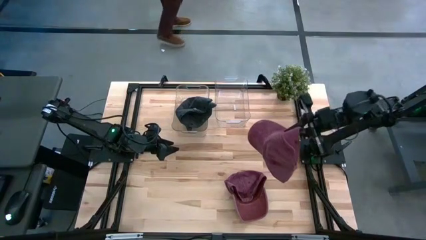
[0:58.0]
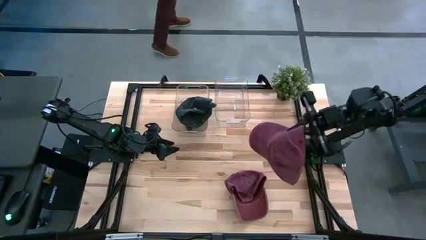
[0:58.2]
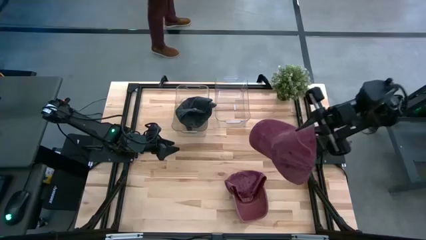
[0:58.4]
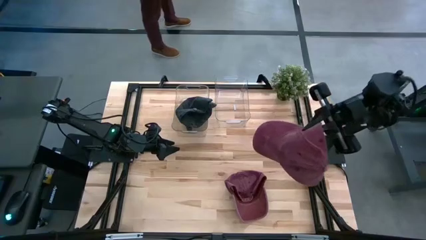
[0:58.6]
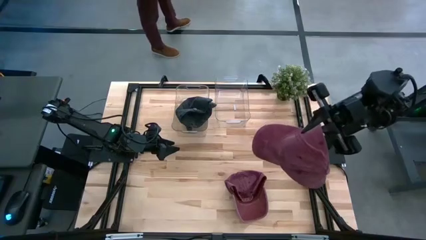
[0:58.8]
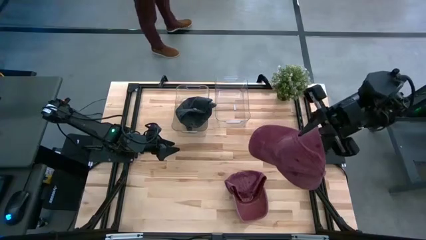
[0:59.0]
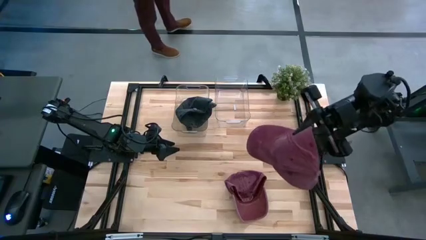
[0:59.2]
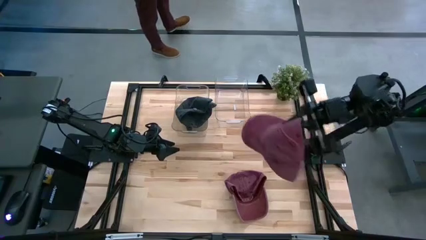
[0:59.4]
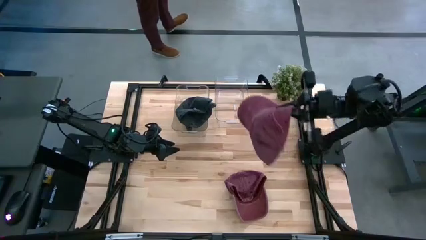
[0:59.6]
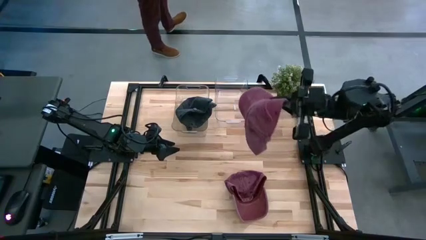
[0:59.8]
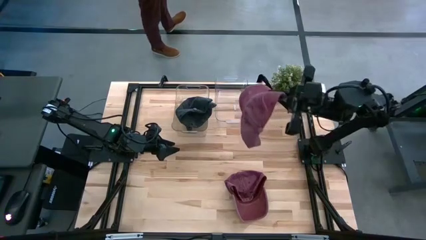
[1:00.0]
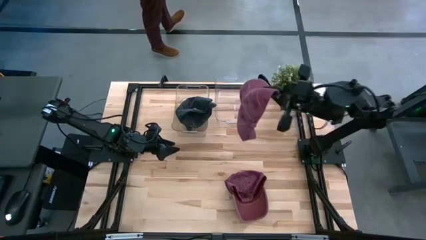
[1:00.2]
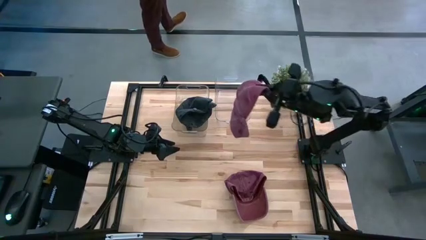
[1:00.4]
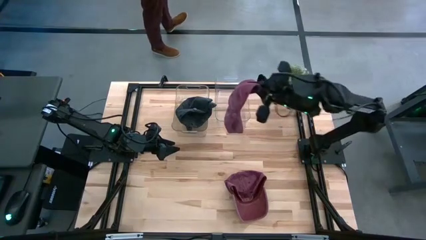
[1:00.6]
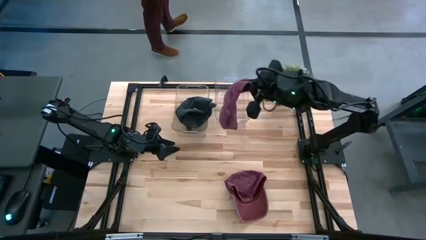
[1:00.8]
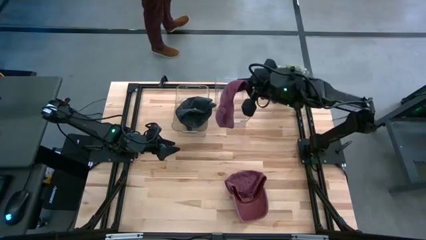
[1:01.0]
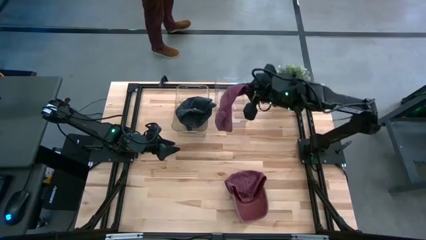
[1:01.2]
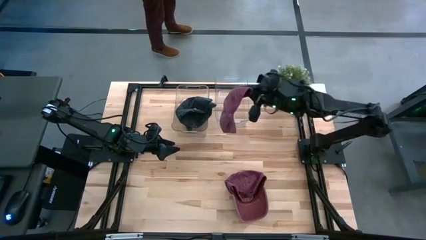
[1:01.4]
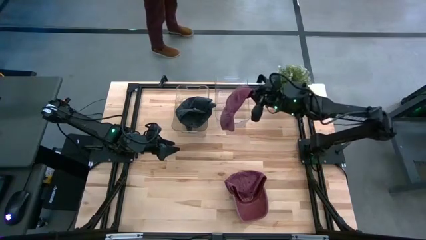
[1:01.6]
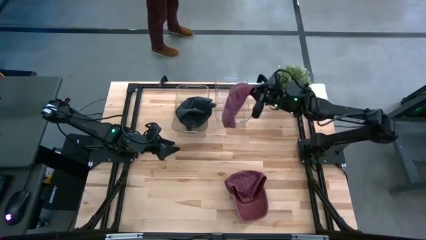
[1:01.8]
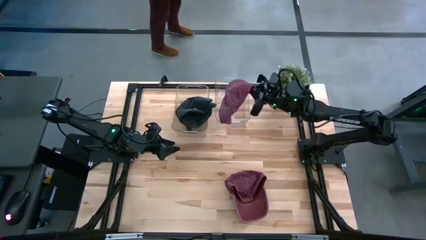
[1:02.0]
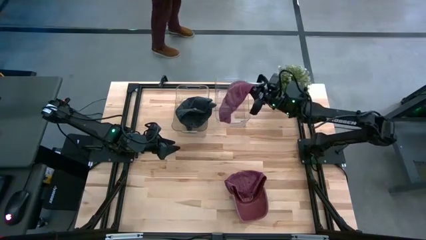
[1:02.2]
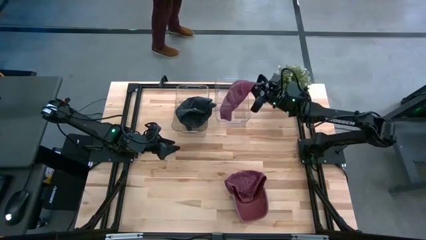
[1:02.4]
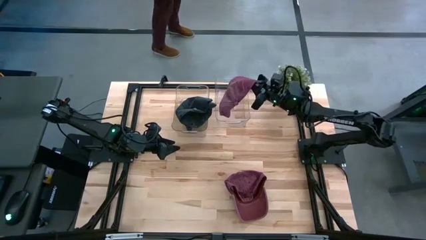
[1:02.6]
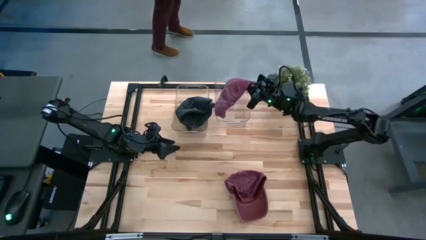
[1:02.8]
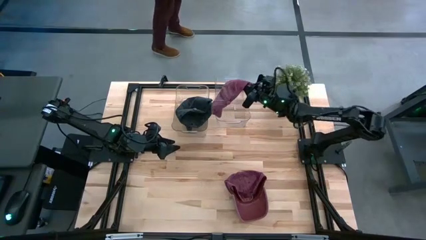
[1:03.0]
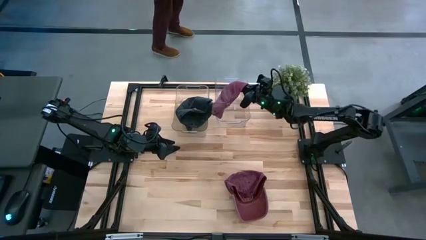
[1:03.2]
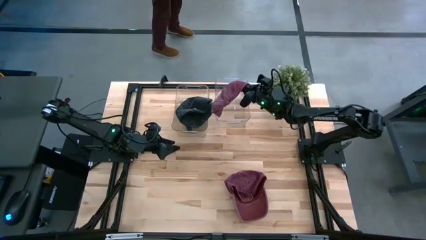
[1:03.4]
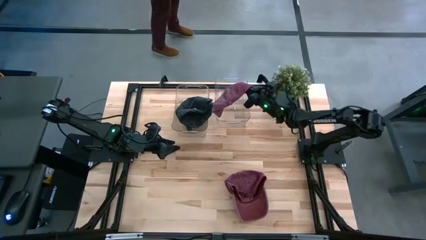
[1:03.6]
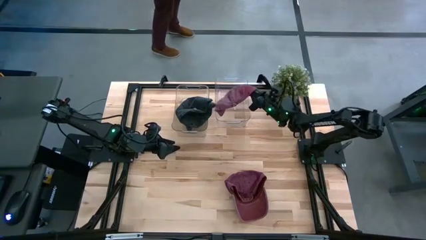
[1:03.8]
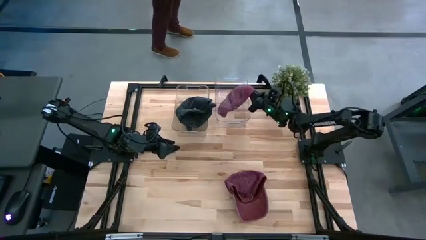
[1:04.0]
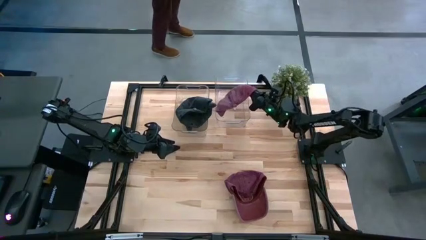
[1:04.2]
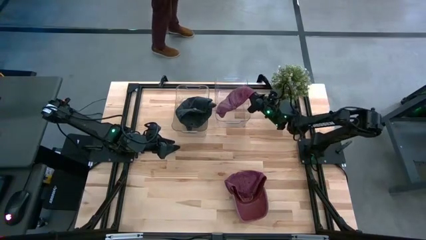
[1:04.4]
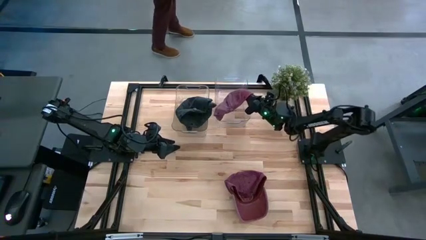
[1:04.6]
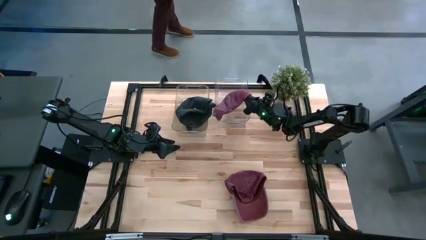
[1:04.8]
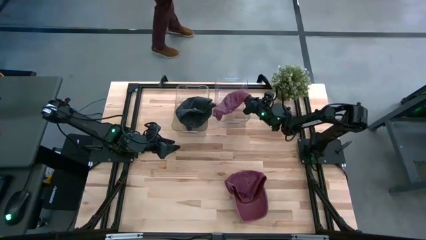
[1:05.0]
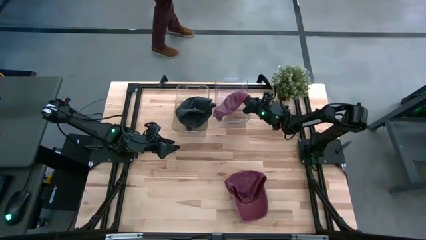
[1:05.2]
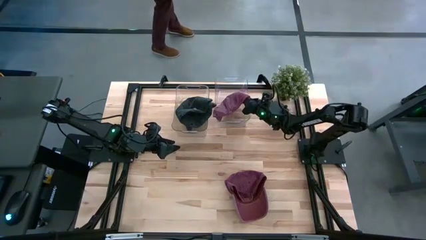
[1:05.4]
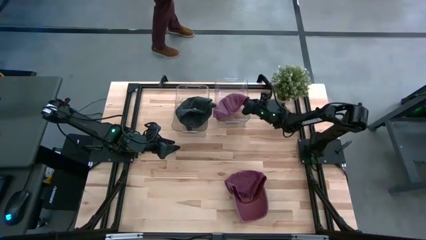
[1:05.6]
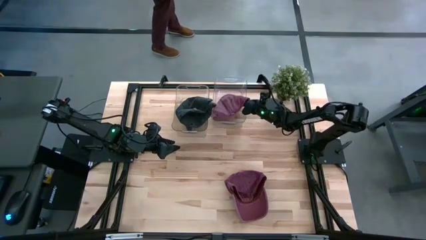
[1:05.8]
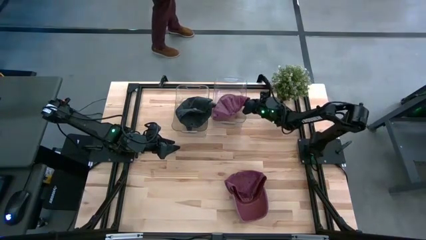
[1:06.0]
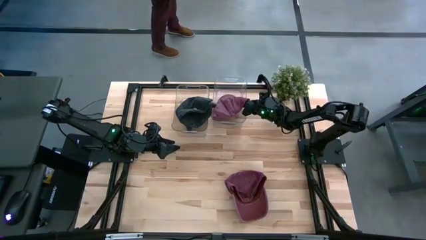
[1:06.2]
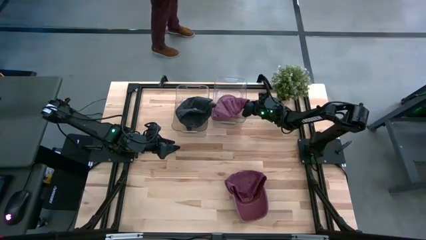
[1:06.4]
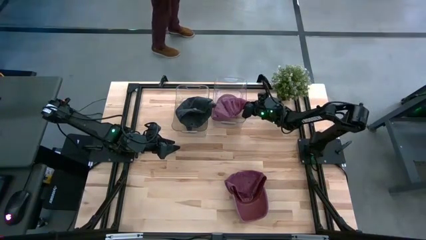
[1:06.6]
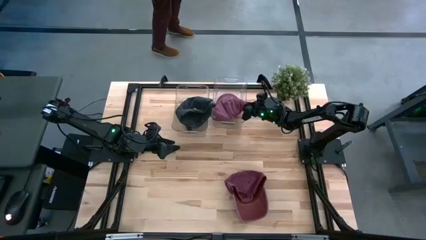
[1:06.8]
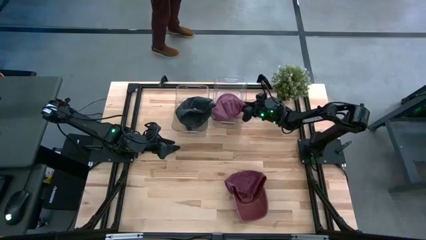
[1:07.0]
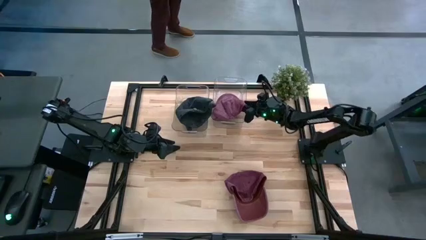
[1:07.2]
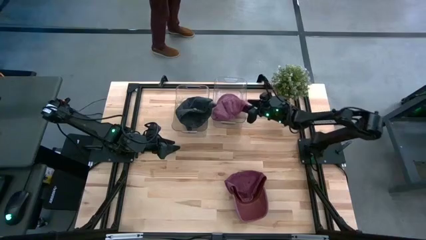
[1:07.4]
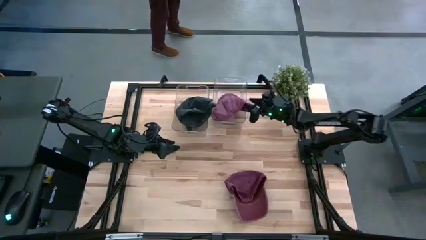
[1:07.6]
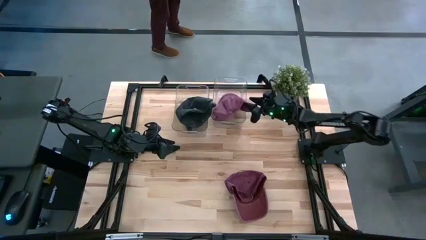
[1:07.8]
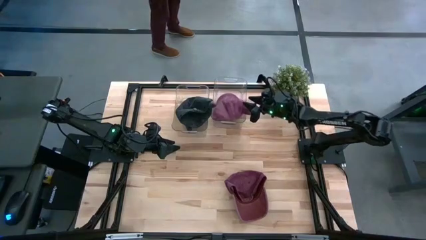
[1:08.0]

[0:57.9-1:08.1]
Task: Pick & Place hat
Put the right red cap into the right transparent bin

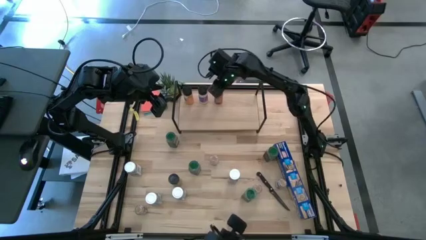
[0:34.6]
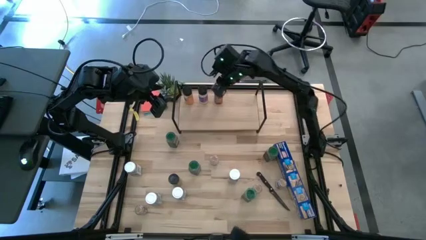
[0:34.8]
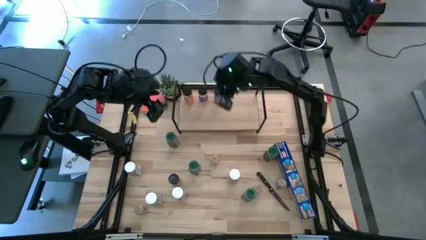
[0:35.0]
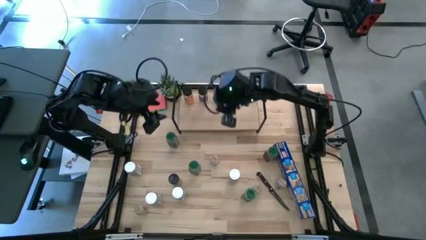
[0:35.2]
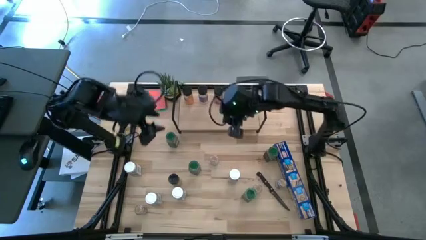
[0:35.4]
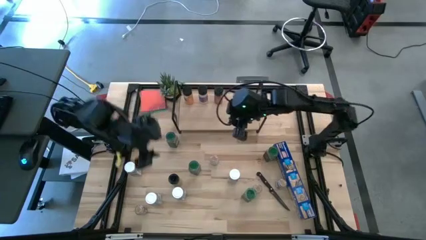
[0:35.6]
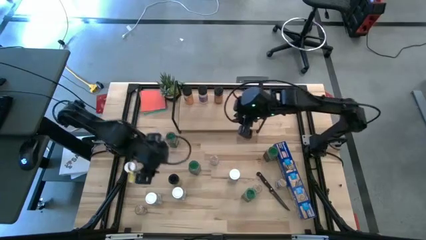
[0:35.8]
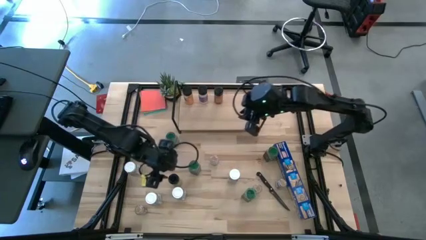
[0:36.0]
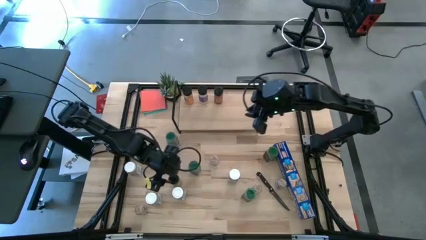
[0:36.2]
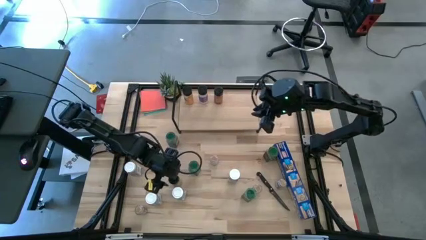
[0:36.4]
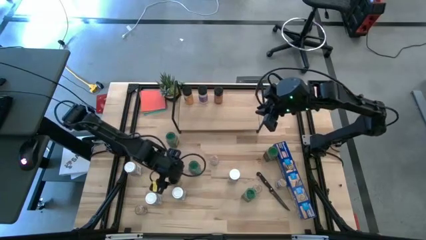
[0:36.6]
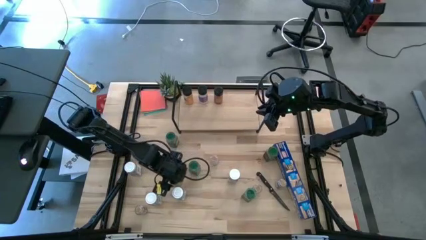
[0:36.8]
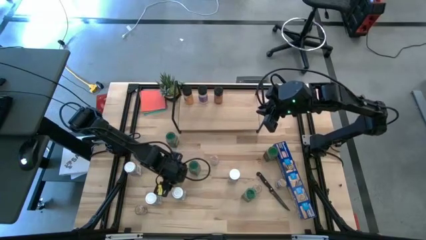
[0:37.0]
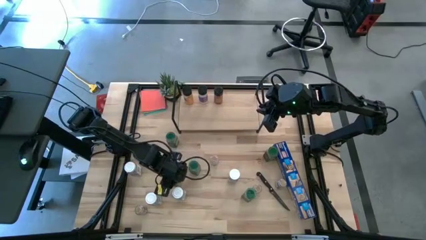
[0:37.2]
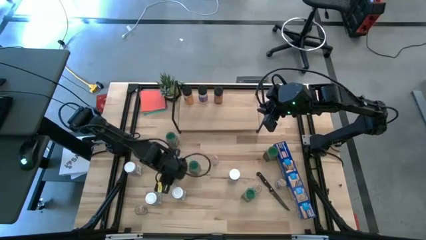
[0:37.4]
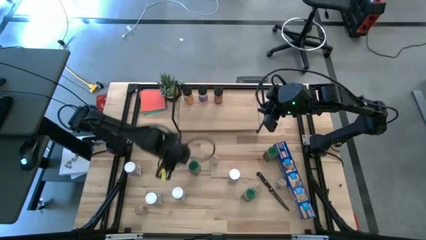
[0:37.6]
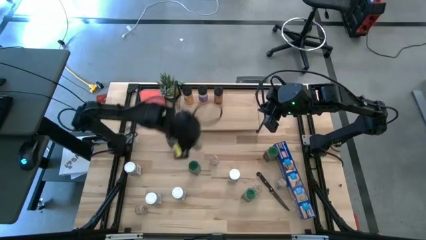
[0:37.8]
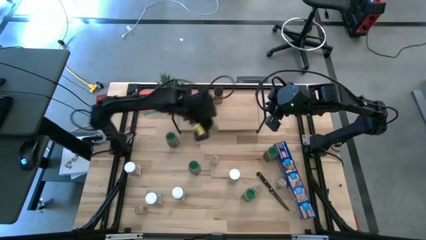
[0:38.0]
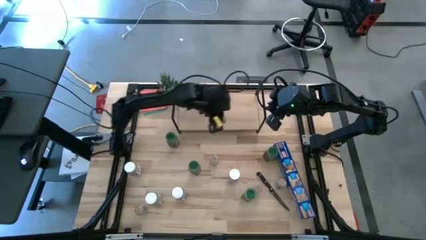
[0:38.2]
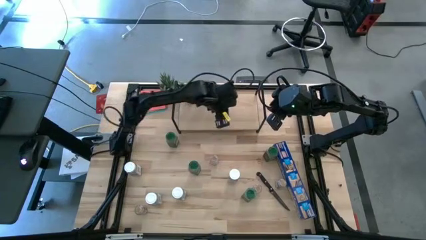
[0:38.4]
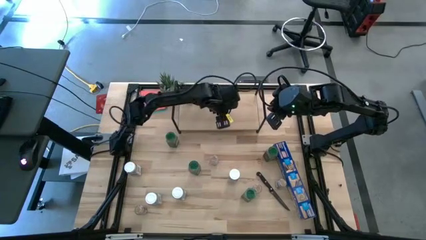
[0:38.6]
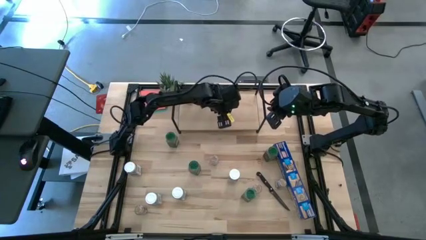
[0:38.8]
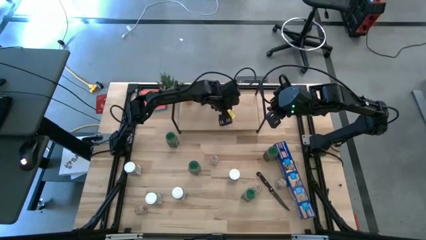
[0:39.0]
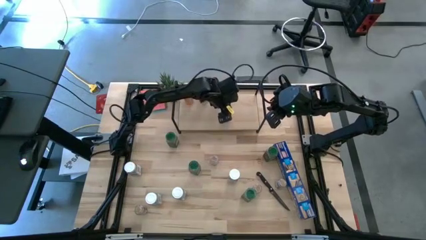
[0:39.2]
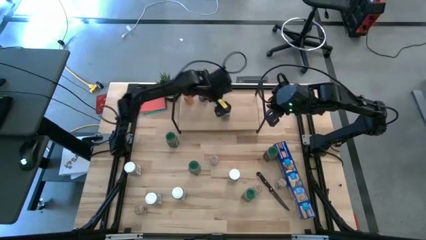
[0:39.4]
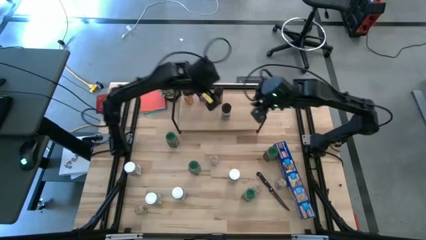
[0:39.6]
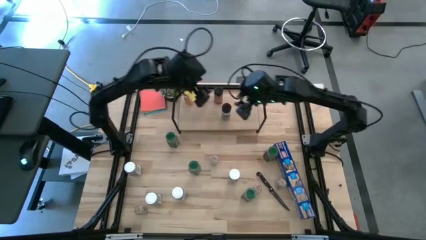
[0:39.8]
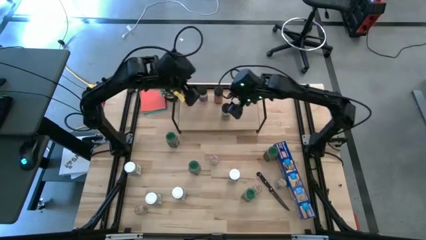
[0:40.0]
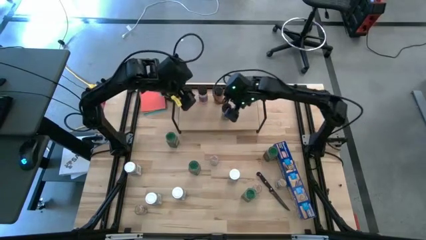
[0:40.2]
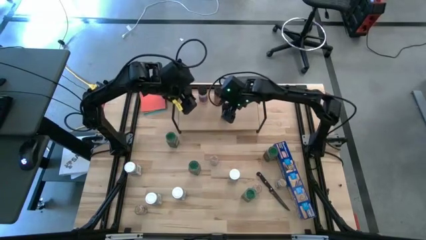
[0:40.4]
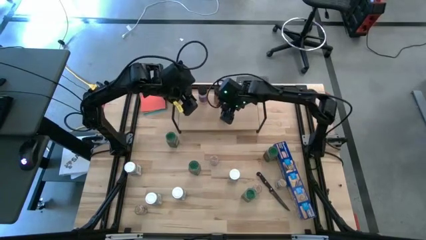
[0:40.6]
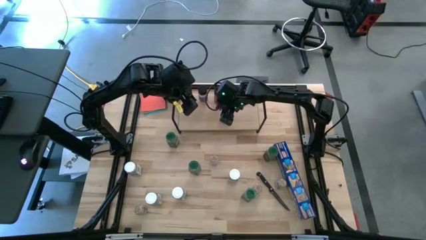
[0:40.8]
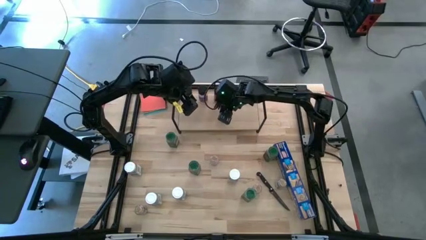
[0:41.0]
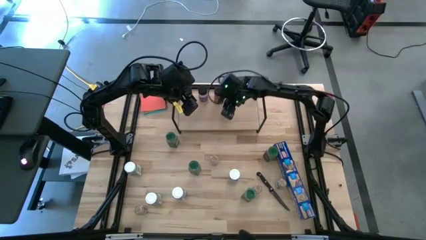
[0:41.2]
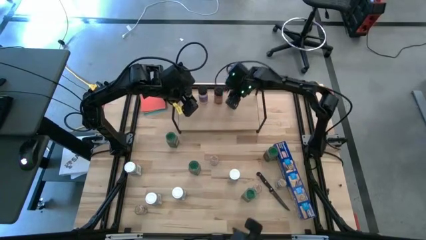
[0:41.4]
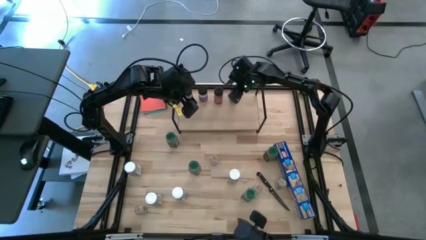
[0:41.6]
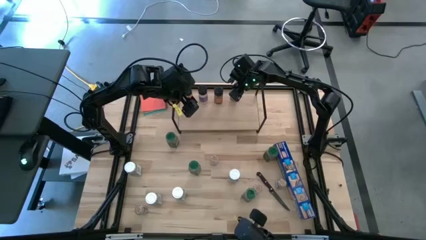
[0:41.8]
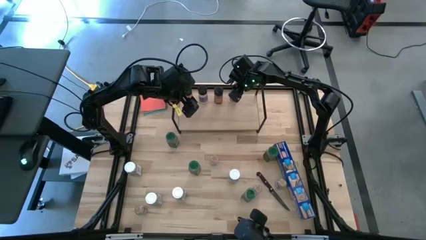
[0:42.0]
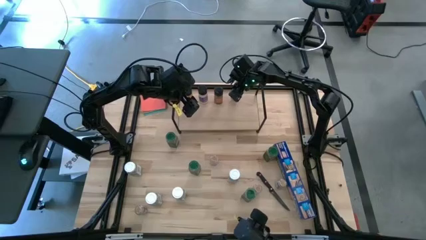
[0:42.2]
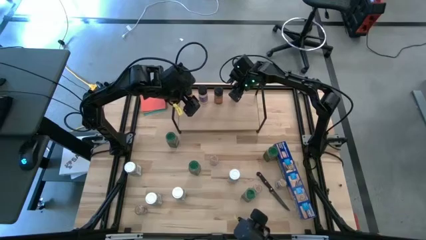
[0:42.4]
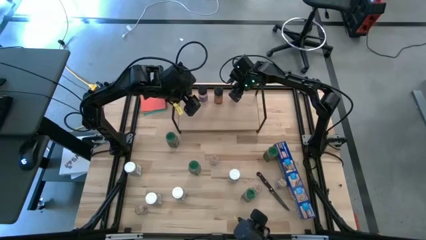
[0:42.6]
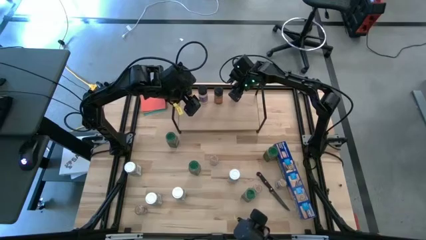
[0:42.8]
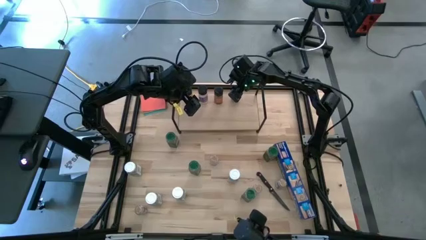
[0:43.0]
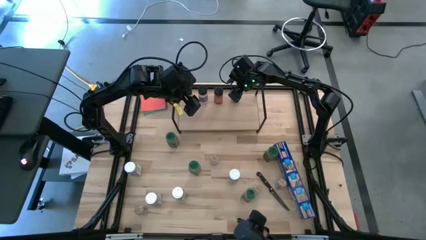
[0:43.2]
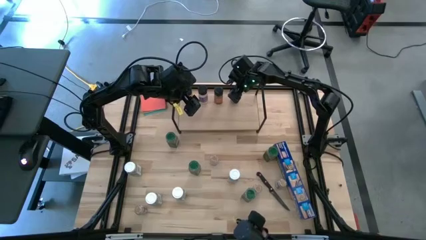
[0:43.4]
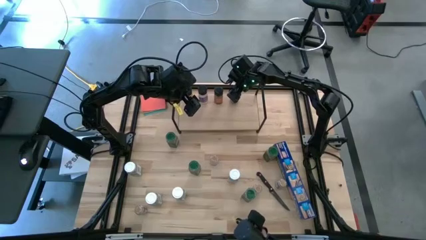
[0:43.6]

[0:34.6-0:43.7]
Task: Shelf spices
Put the black seasoning bottle on the shelf
